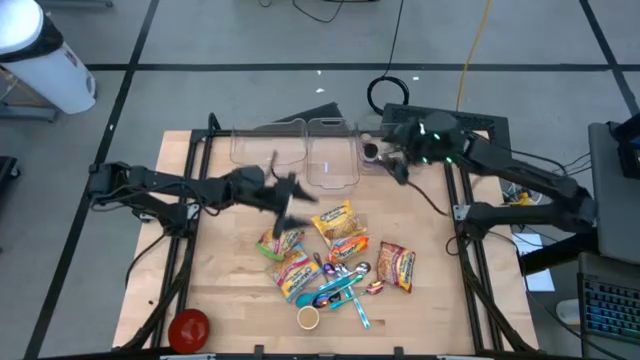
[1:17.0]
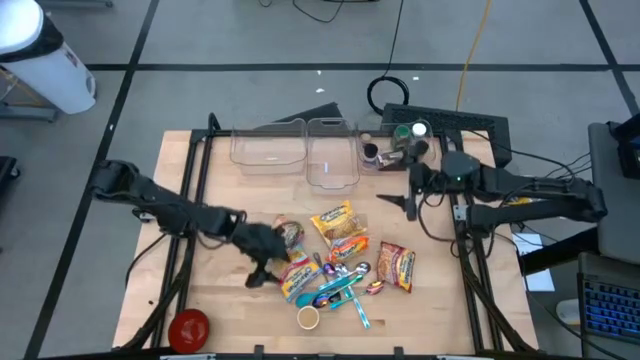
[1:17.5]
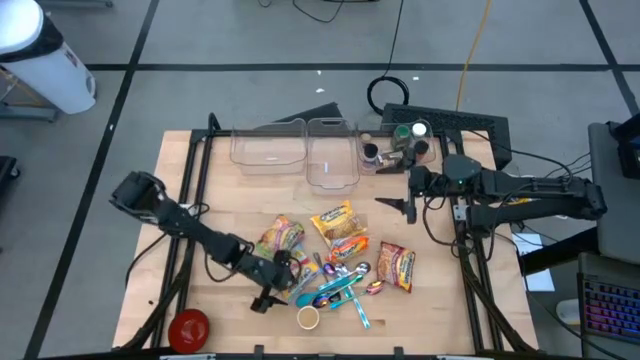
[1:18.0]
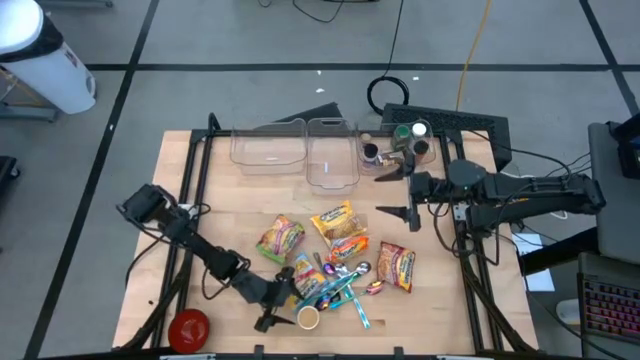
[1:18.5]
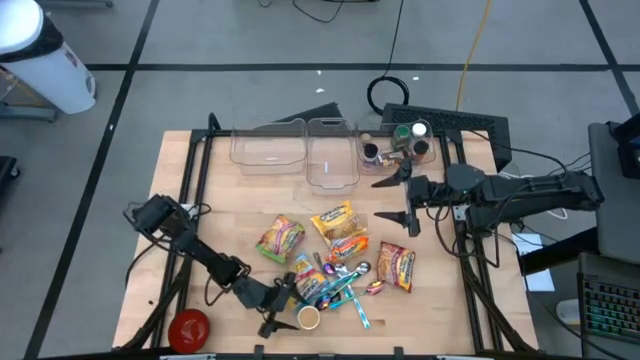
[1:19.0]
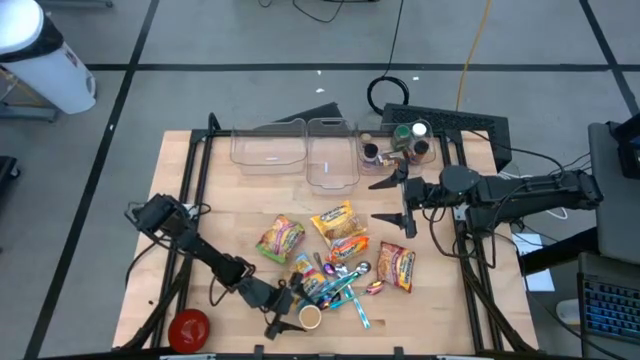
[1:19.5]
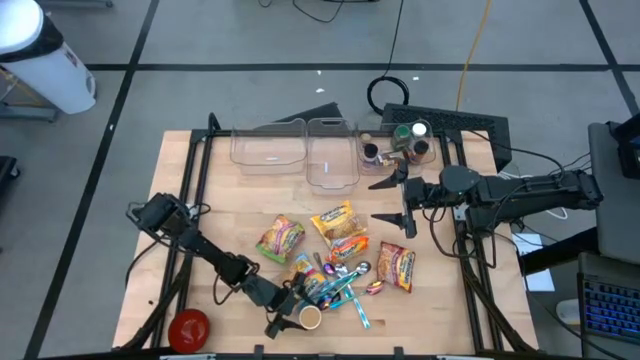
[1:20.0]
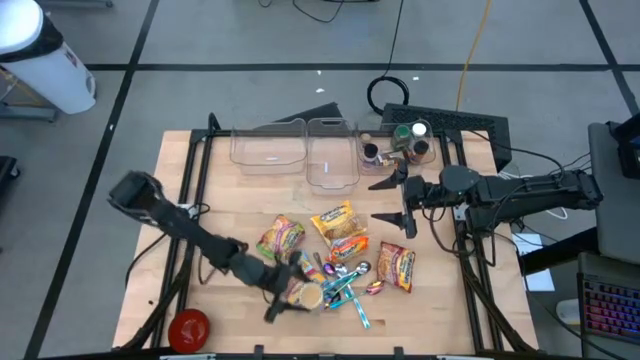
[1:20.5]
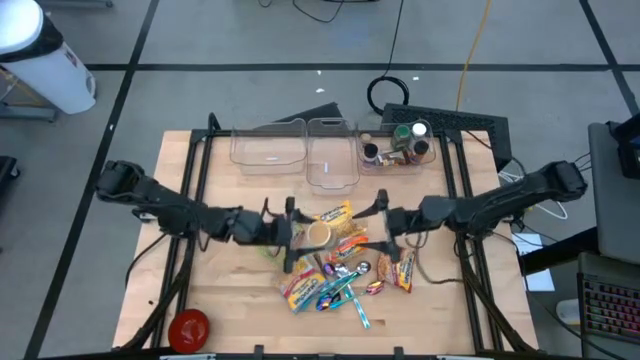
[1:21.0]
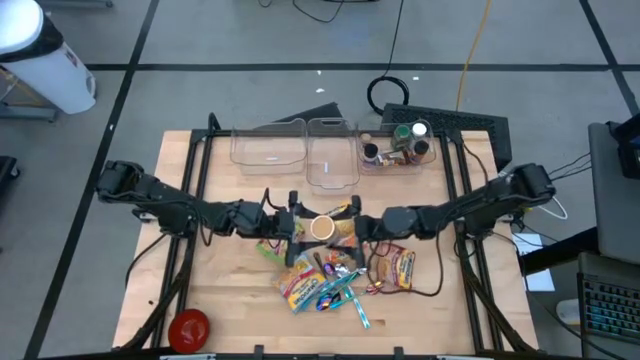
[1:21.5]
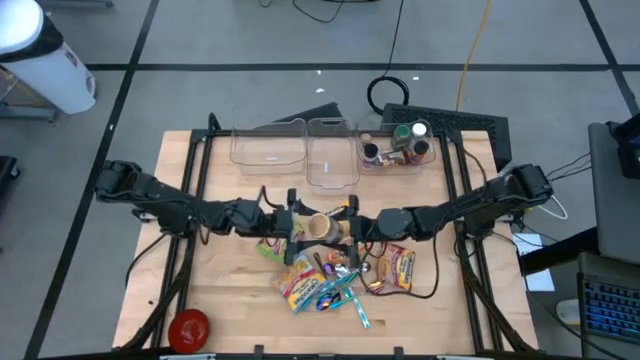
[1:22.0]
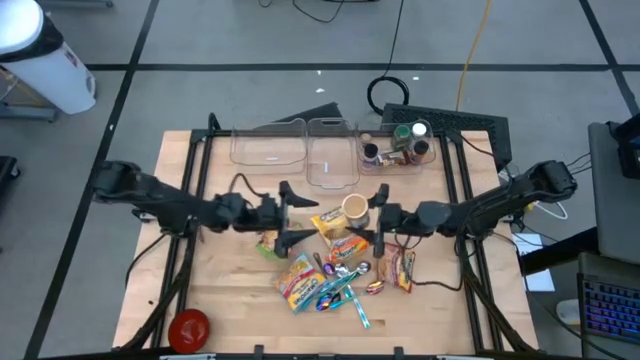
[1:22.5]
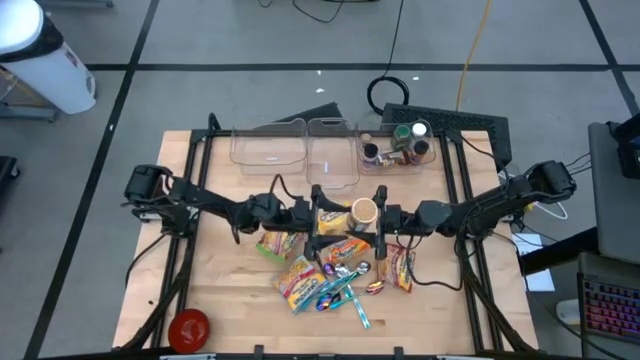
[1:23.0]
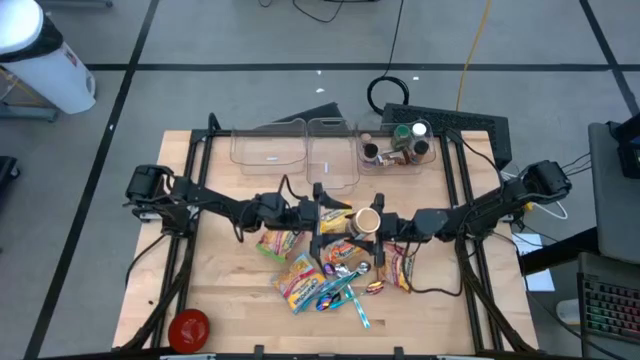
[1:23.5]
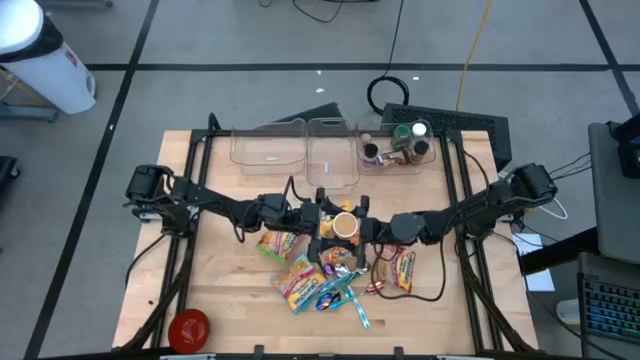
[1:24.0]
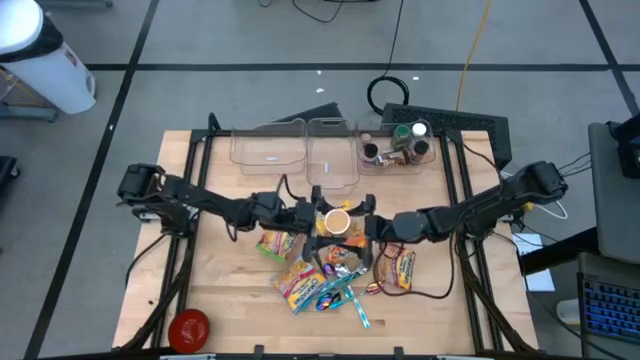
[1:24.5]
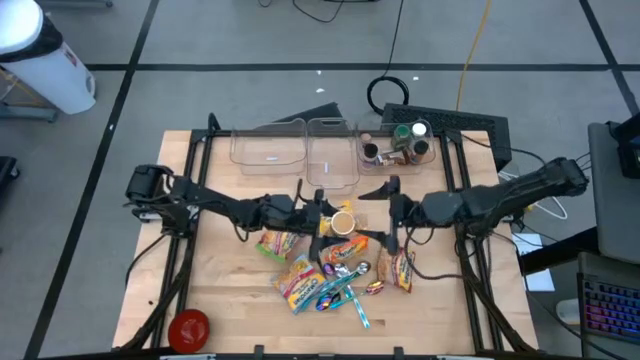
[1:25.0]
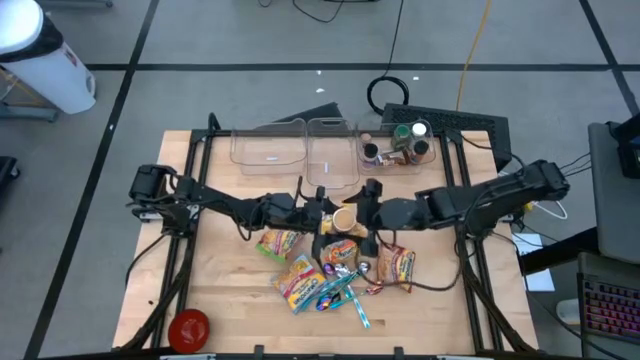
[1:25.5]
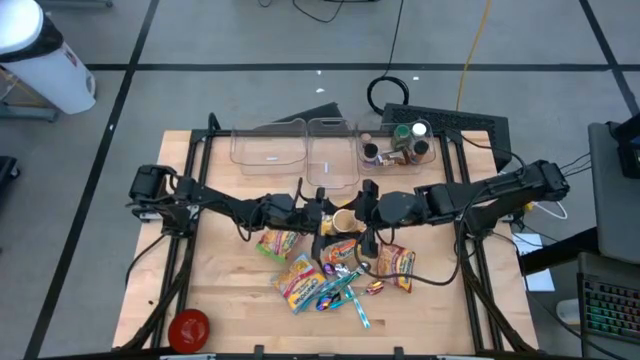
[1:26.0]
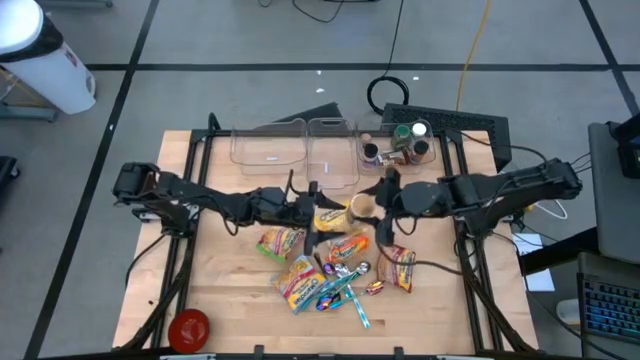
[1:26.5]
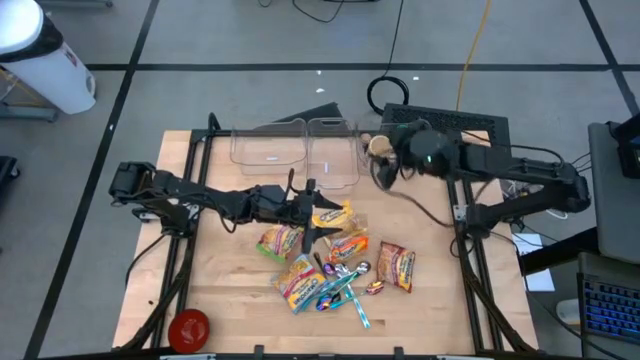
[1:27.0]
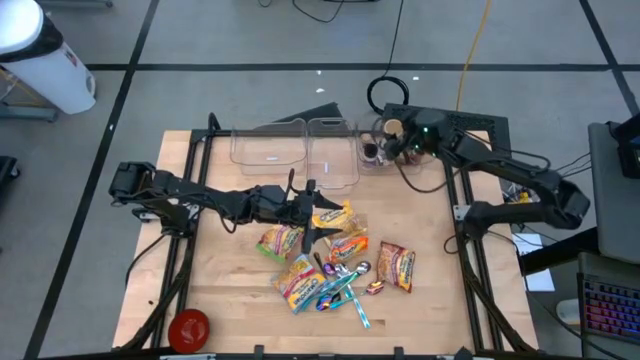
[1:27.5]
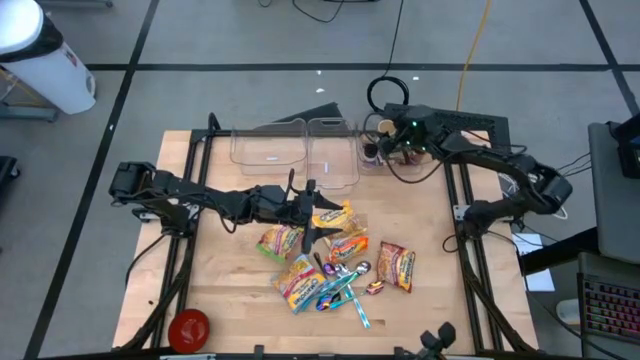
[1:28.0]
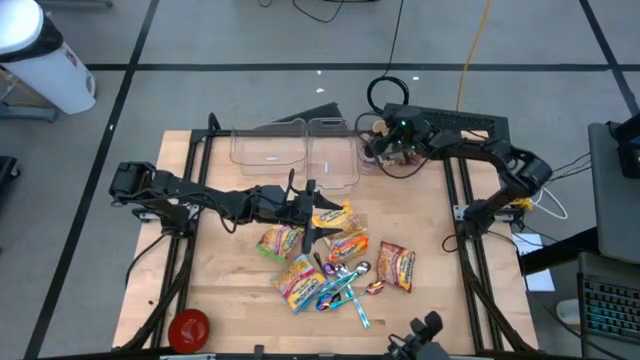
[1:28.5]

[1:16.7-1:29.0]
Task: Pick & Place Food Item
Put the gold seasoning bottle into the right transparent bin

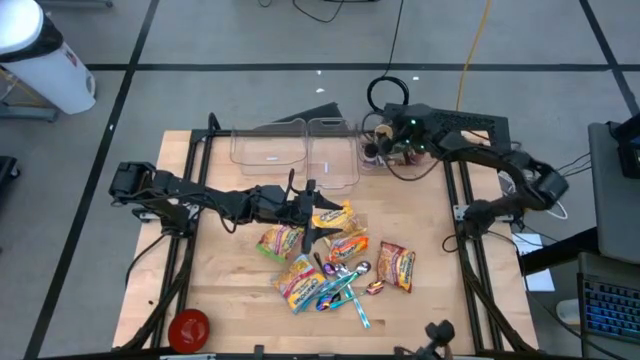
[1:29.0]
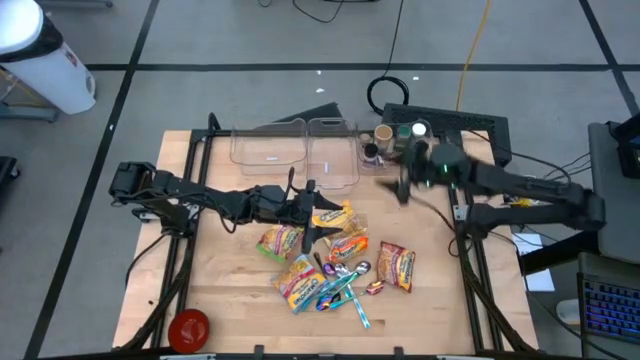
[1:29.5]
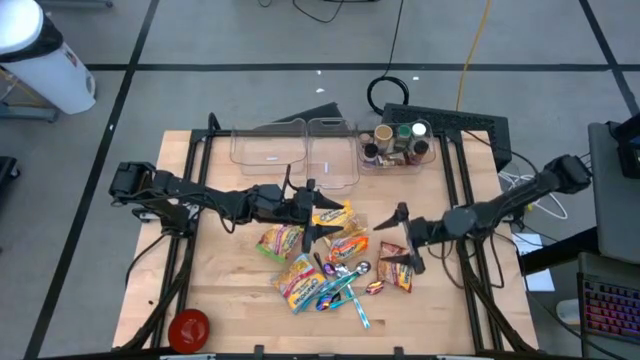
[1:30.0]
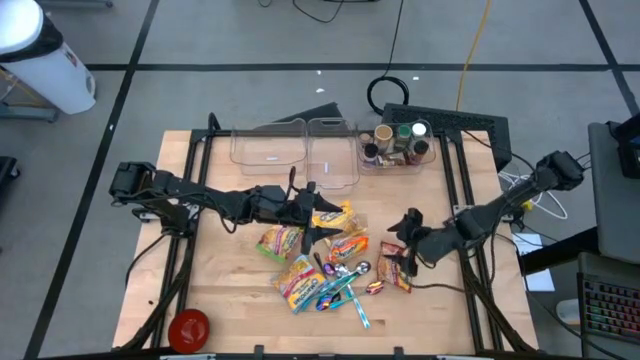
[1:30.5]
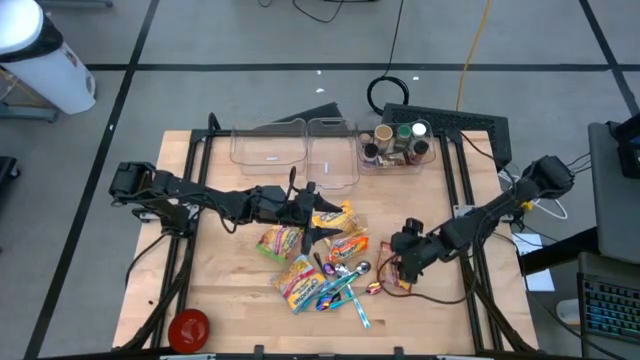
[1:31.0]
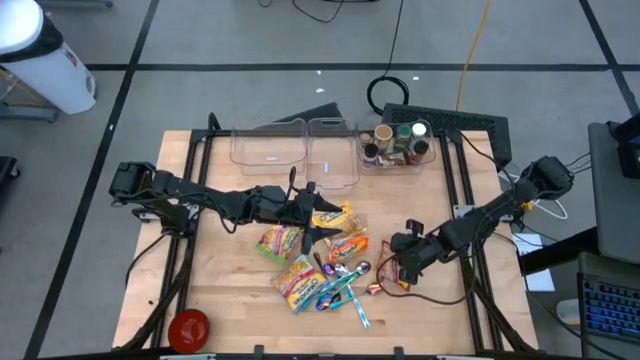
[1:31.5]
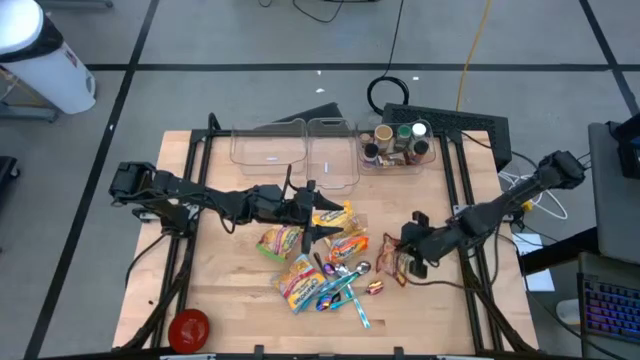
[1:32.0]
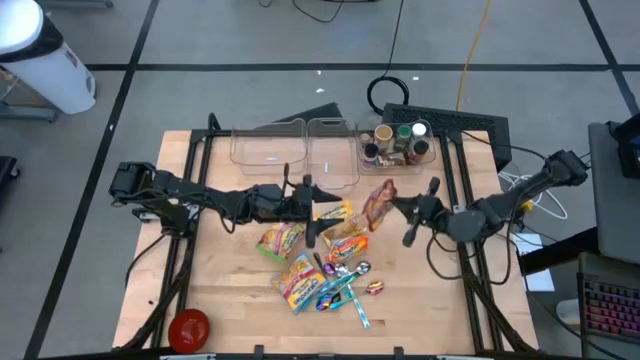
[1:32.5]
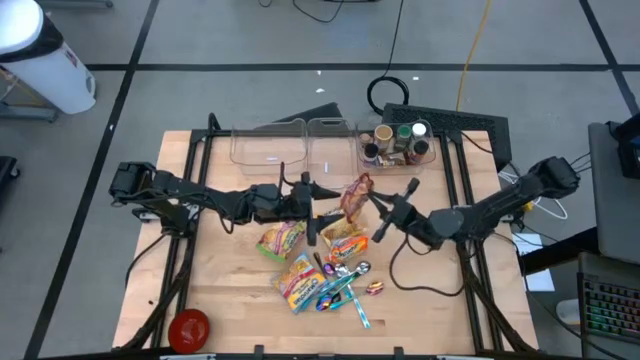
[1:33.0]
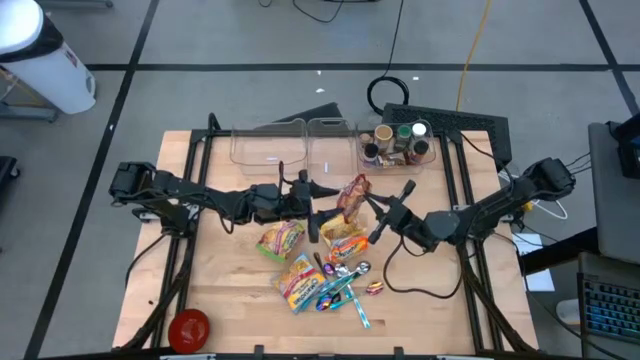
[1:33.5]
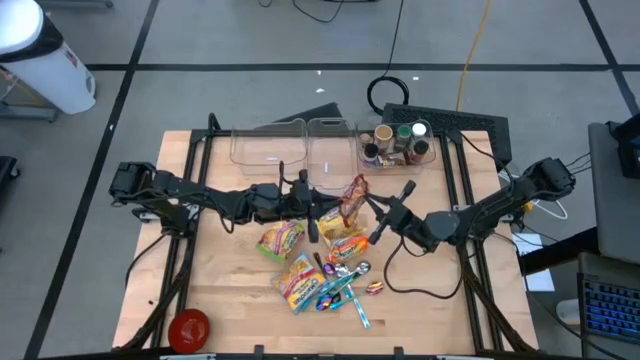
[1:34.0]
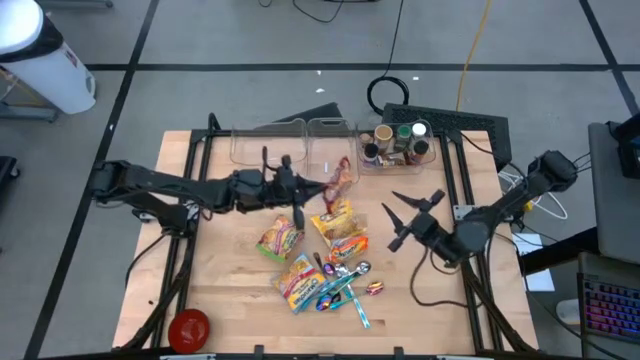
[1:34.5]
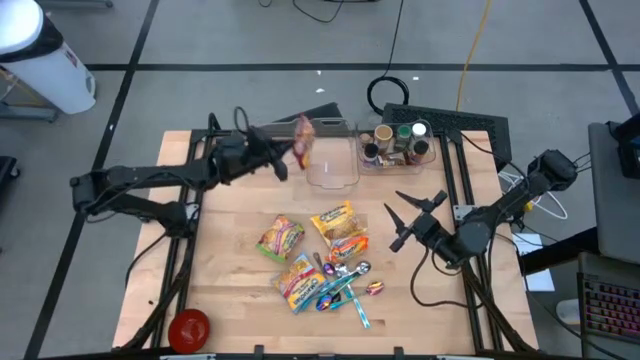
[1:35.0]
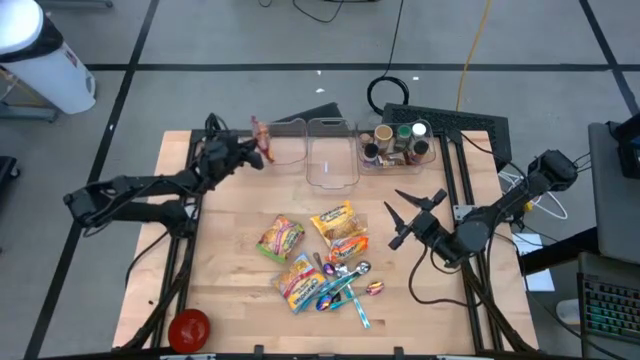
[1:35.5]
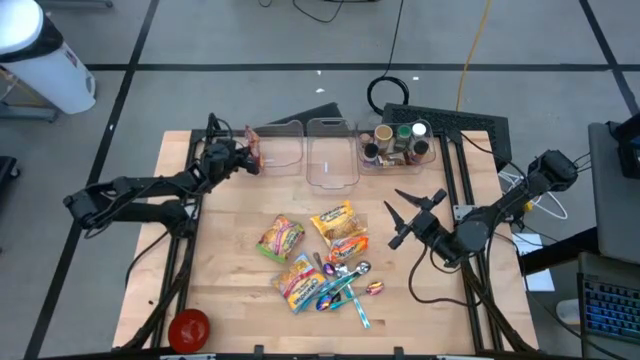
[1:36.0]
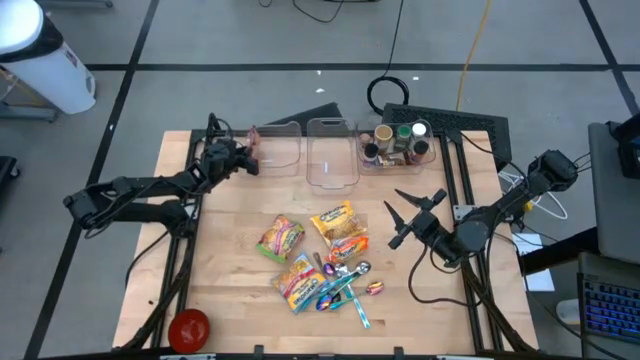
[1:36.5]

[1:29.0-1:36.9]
Put the red noodle pack into the left transparent bin

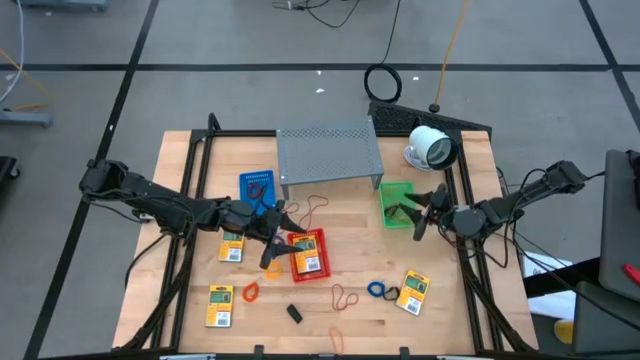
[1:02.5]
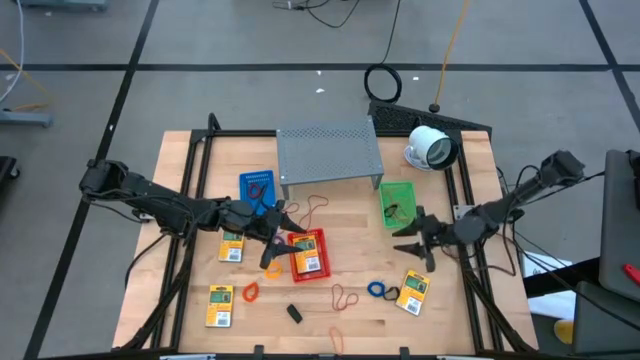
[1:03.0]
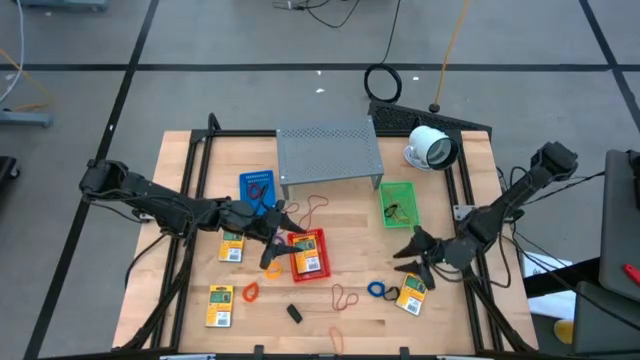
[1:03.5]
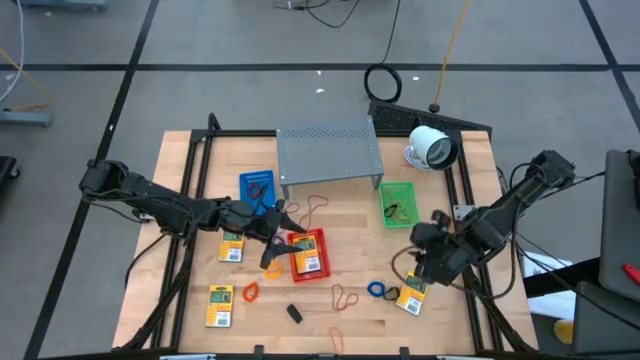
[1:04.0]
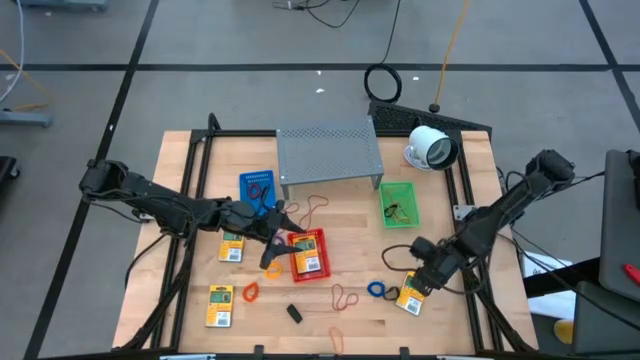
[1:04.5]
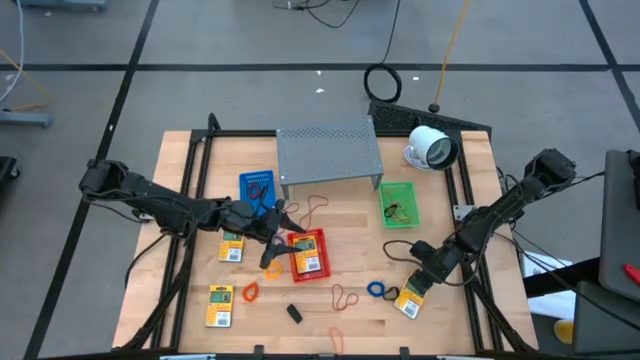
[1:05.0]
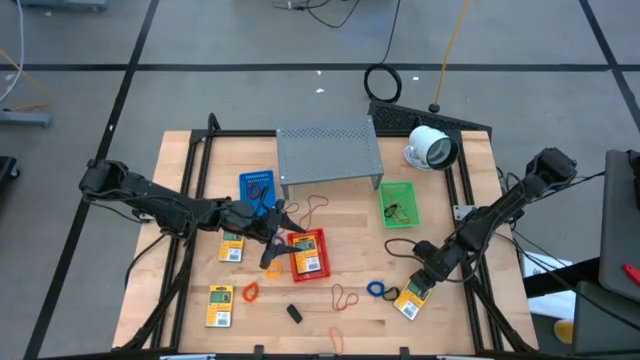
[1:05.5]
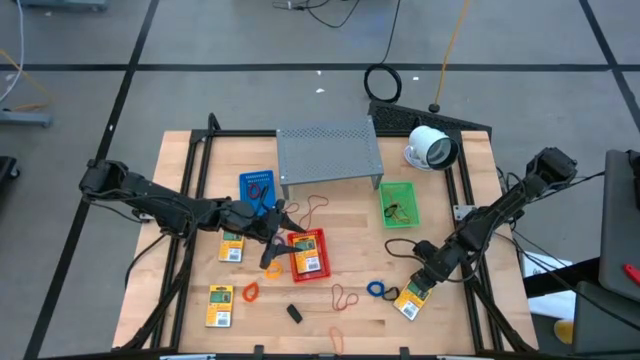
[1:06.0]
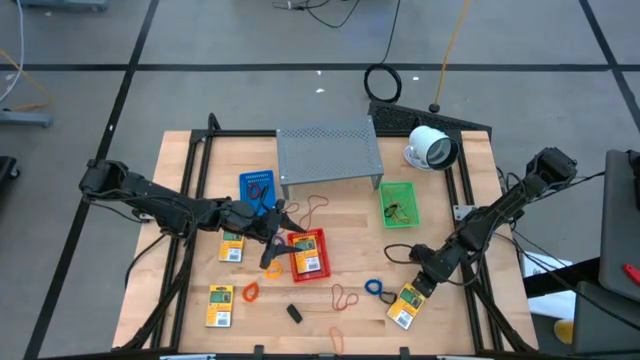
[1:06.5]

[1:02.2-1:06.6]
Task: Pick & Place Office Desk Supplies
Put the bottom right yellow crayon box into the red bin
